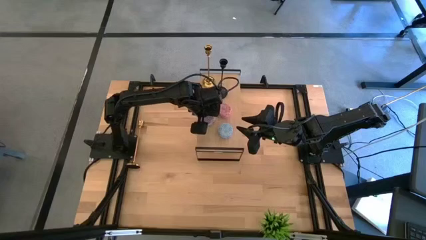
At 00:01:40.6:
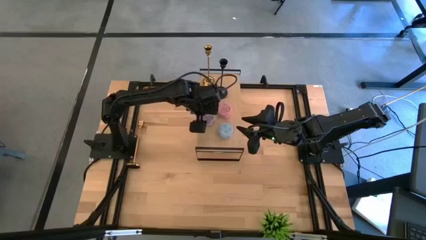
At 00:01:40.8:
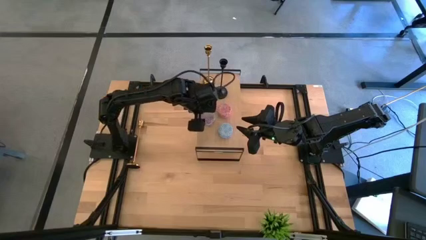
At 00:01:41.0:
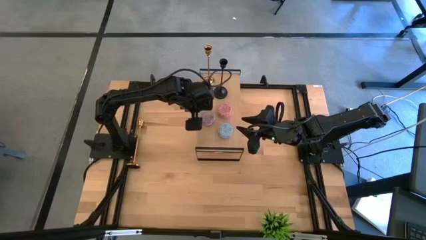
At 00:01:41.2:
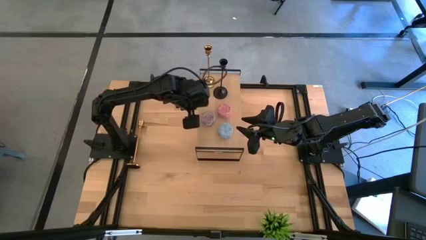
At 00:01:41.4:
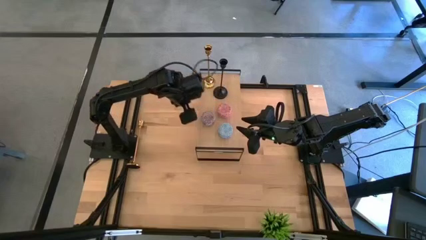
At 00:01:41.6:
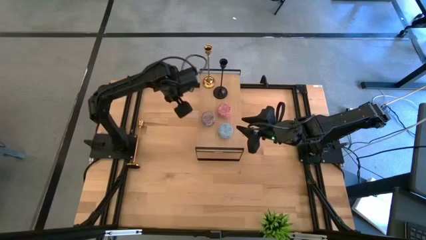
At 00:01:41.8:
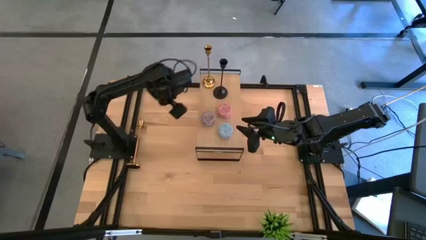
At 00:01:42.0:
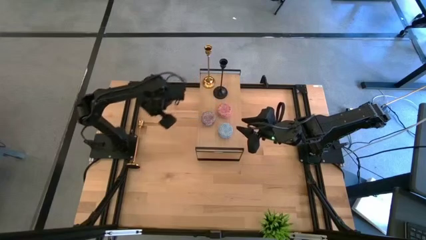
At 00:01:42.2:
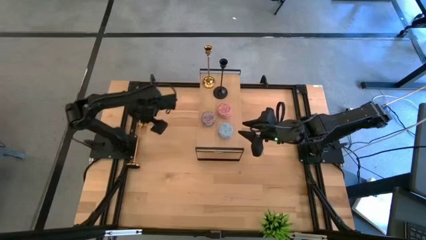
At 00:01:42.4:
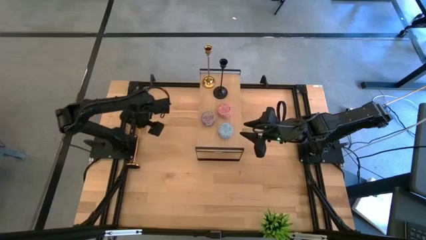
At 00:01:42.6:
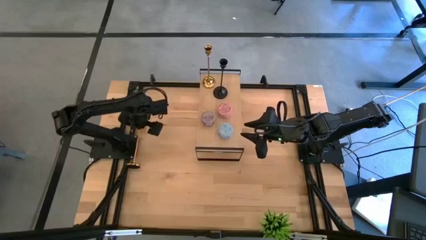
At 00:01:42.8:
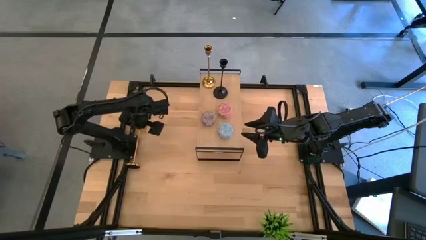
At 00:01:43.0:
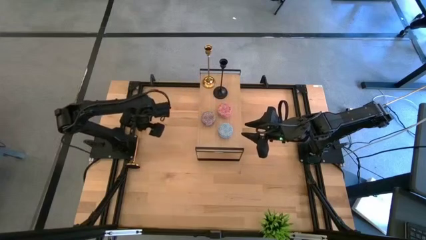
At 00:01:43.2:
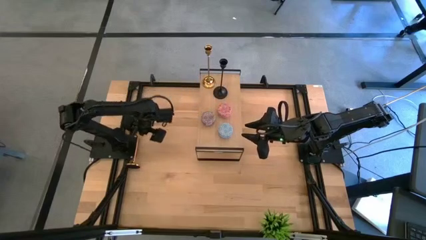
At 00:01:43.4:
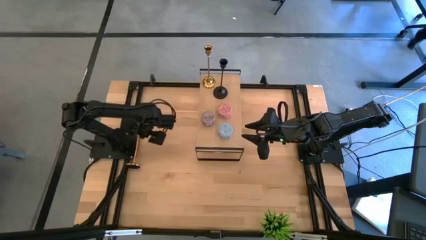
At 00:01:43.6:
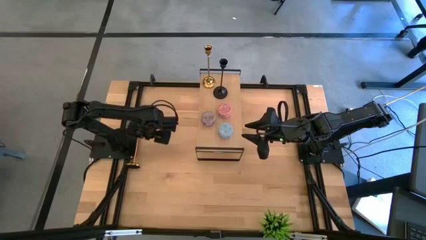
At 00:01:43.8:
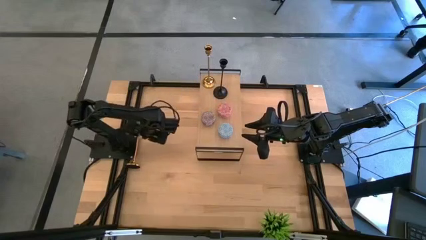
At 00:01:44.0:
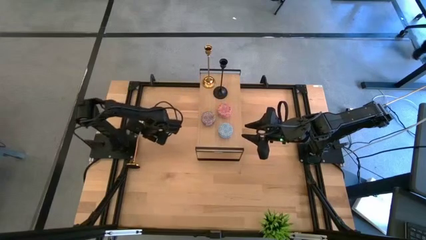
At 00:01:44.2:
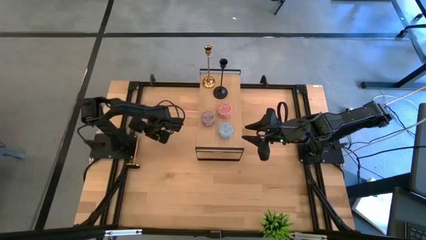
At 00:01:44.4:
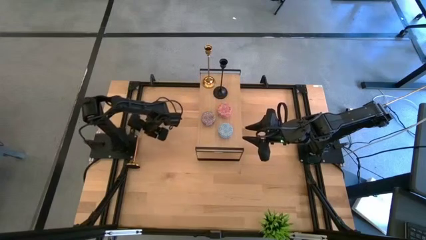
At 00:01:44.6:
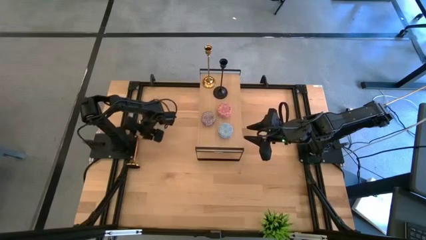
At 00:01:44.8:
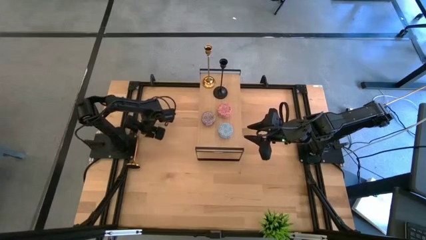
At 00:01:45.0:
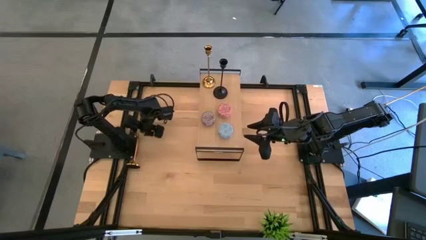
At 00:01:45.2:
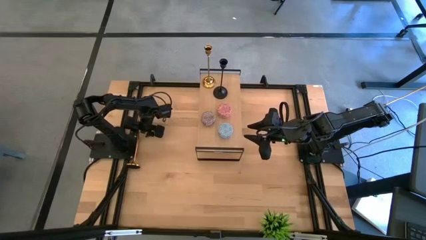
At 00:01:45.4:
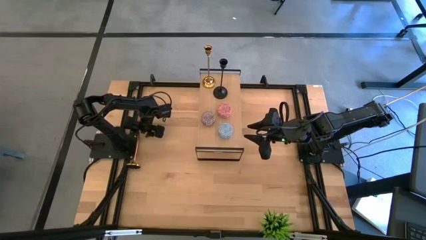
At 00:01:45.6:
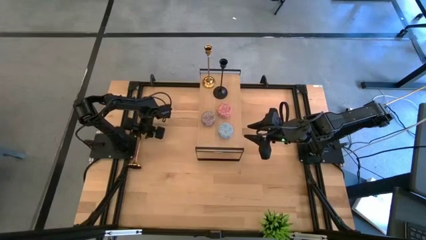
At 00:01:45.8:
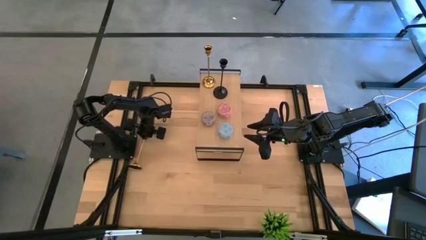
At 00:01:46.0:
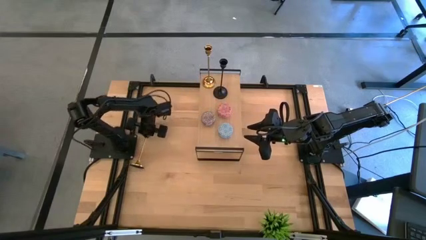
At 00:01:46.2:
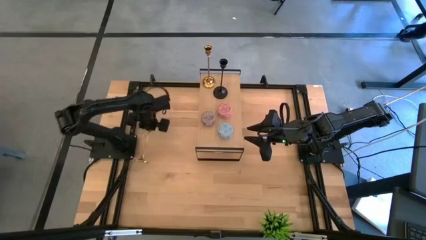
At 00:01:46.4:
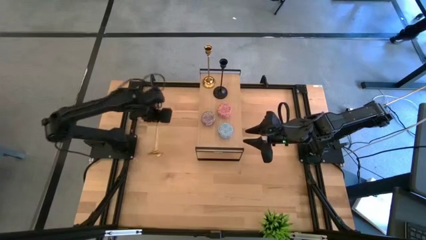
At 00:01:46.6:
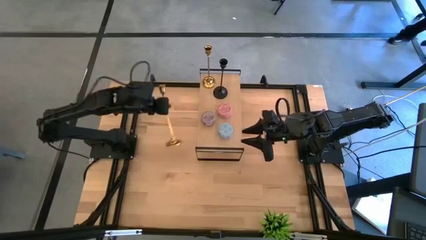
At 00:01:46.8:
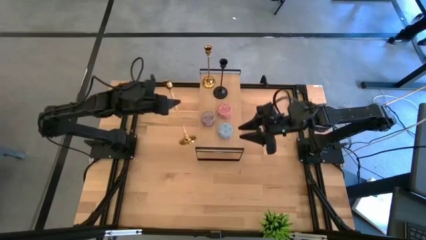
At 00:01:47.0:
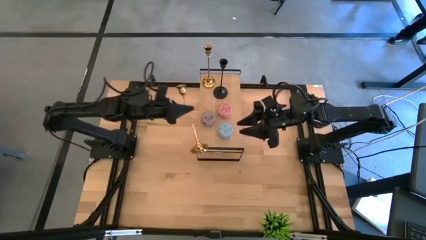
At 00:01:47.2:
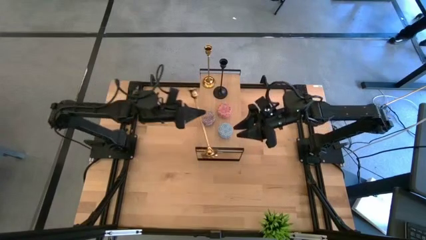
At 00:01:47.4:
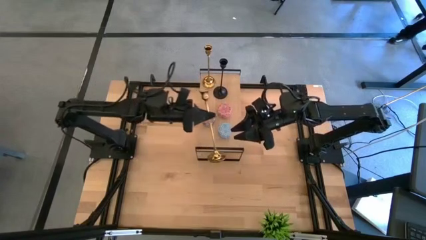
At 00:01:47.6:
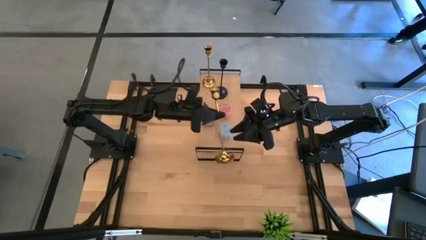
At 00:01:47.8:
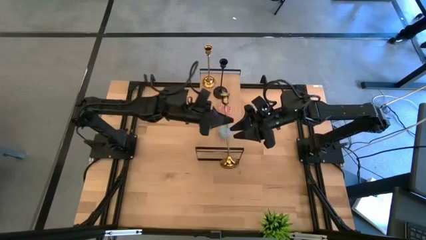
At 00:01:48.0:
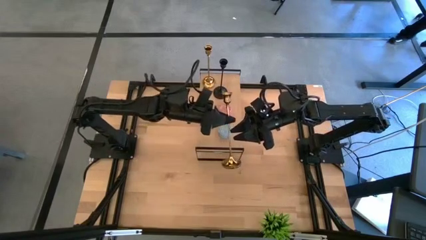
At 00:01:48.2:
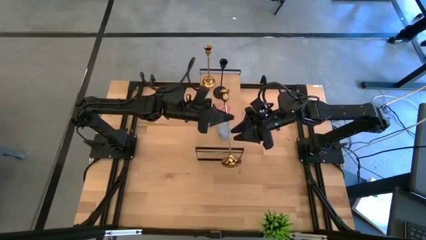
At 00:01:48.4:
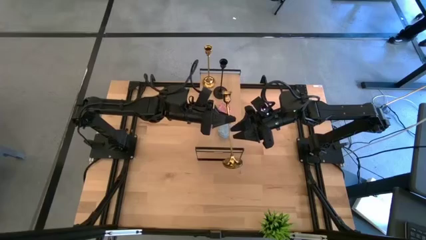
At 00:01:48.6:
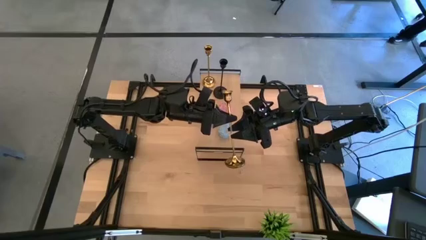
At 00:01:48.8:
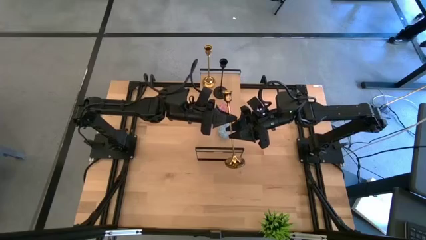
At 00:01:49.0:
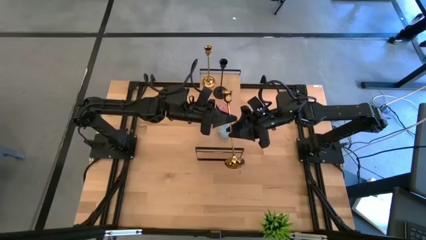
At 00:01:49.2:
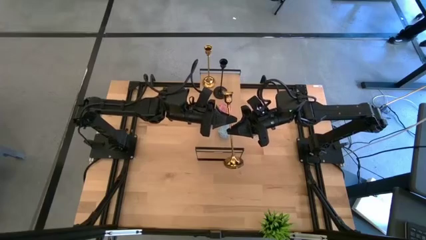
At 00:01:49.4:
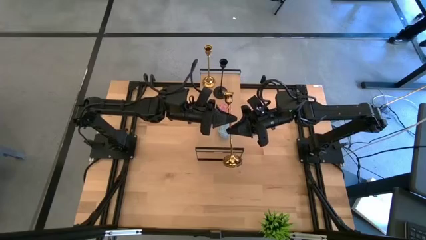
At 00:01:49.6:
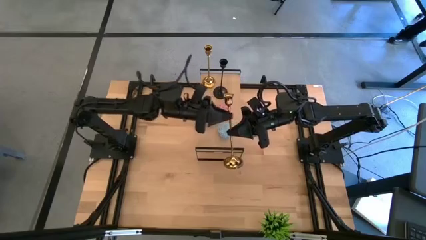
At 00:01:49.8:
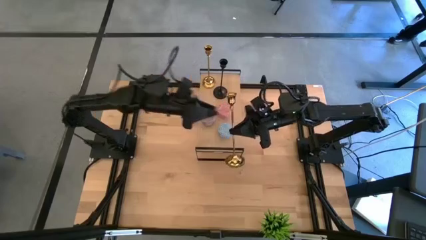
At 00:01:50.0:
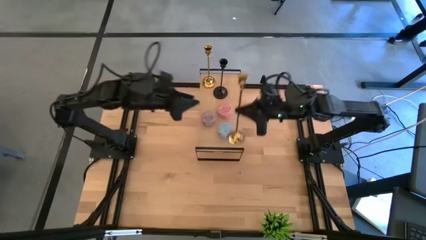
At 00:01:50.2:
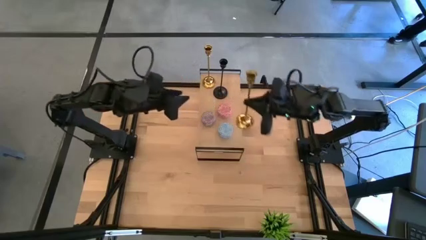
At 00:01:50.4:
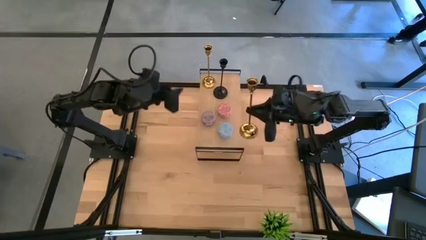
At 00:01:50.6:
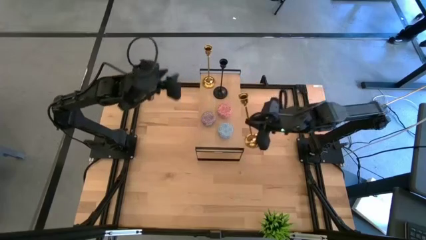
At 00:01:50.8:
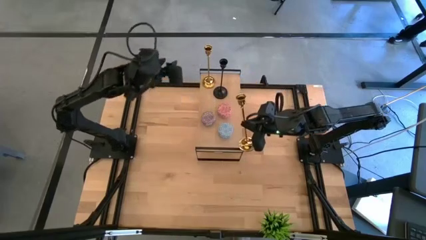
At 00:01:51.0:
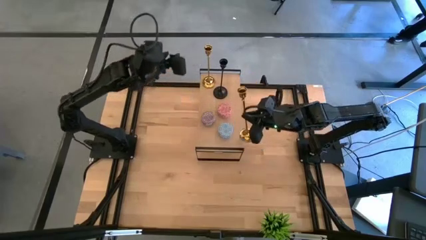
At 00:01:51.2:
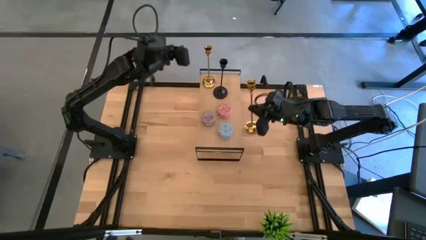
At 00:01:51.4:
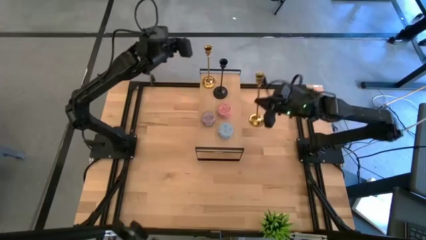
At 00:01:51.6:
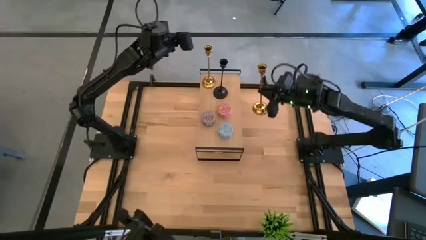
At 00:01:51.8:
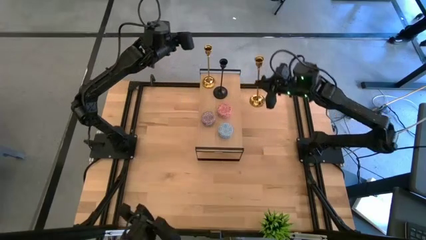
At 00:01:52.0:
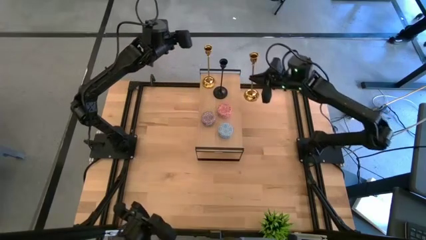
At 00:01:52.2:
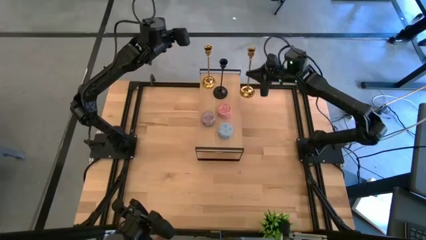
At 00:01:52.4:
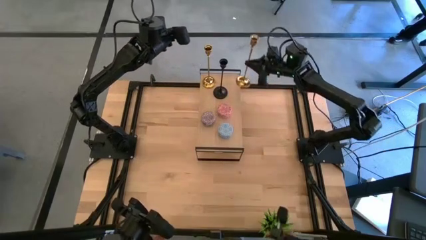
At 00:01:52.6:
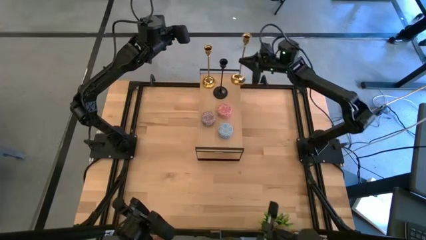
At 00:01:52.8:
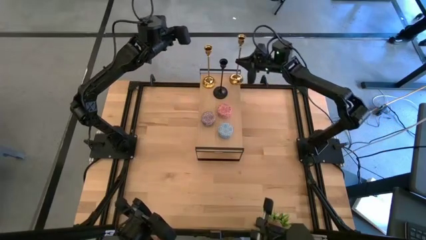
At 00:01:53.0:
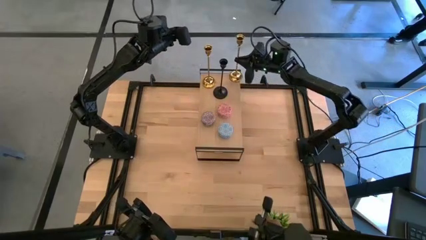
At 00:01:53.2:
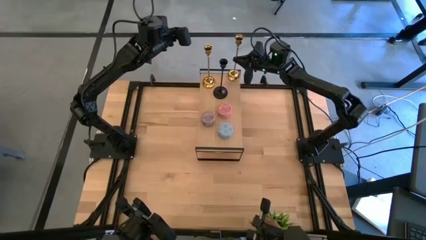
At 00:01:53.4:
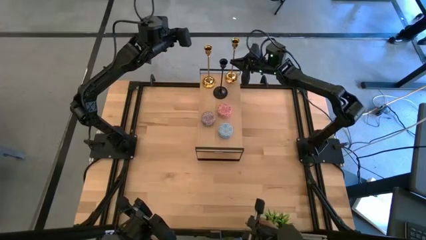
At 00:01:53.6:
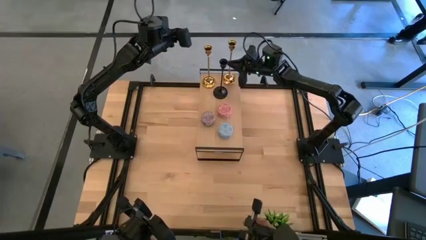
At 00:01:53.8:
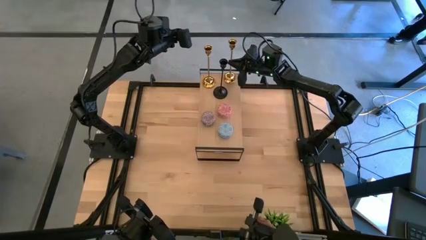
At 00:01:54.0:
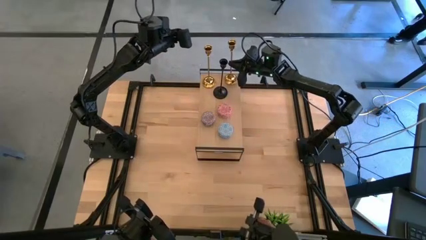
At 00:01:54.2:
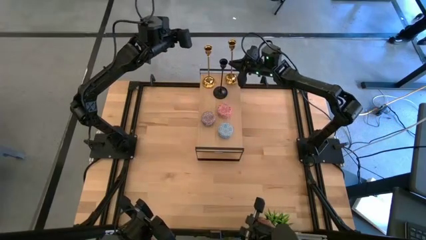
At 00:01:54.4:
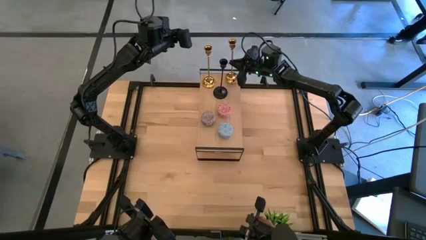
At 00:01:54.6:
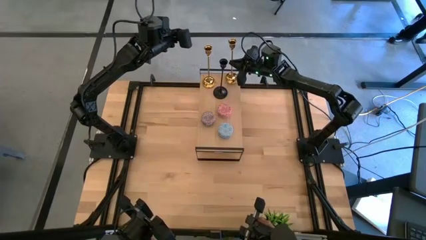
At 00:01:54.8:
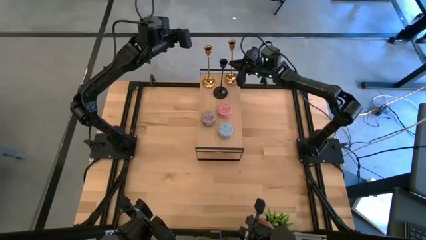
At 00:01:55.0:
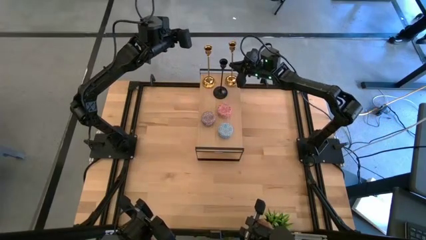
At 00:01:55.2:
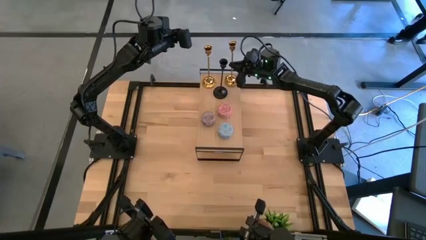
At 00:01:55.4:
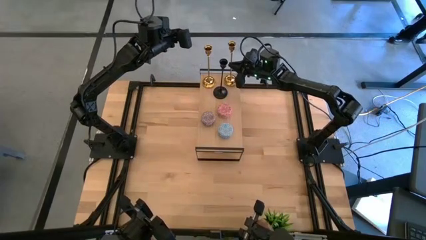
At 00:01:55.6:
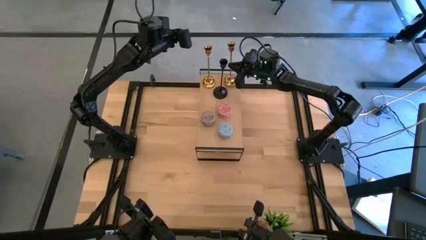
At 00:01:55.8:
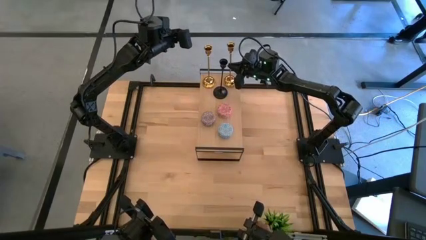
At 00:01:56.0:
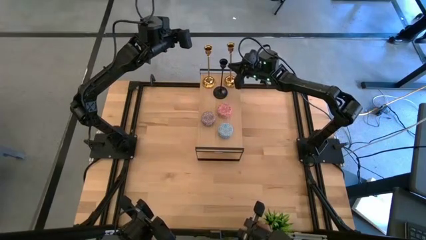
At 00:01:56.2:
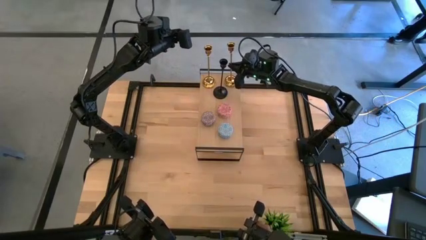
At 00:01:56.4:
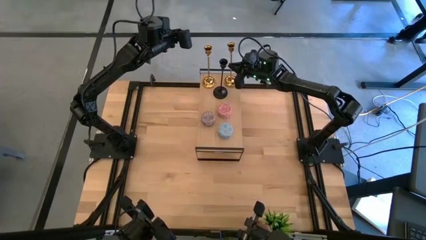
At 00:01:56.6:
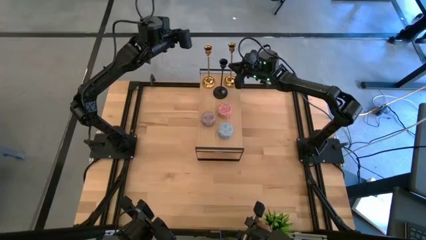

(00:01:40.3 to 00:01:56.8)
Task: Pick & Place candle stick holders
Put the gold candle holder on the shelf
